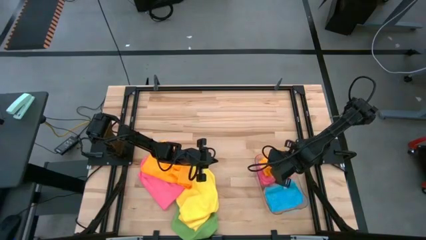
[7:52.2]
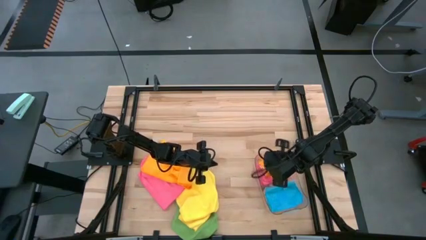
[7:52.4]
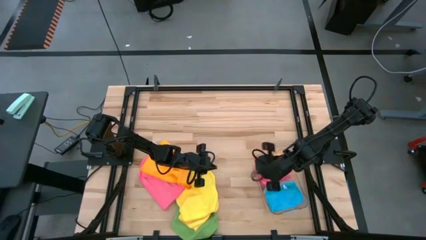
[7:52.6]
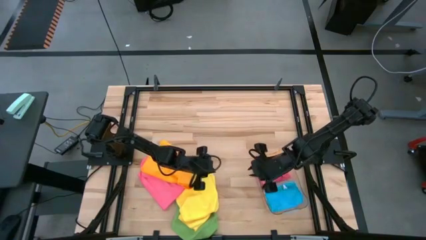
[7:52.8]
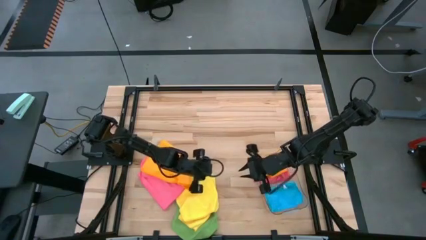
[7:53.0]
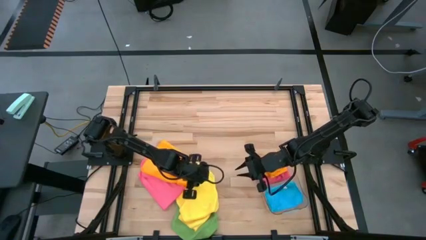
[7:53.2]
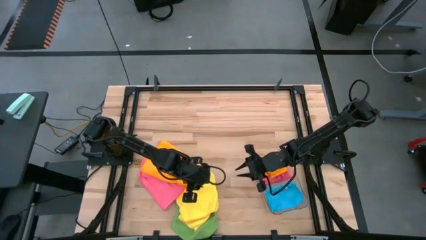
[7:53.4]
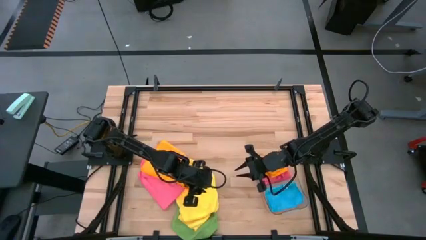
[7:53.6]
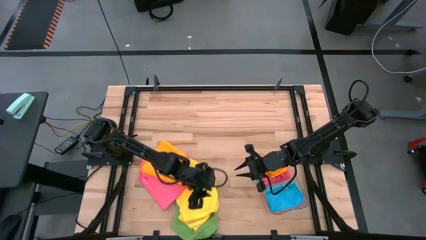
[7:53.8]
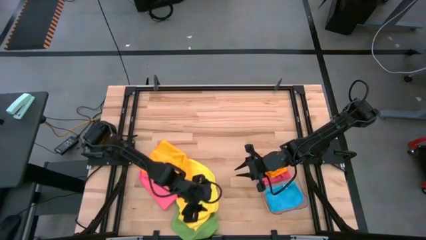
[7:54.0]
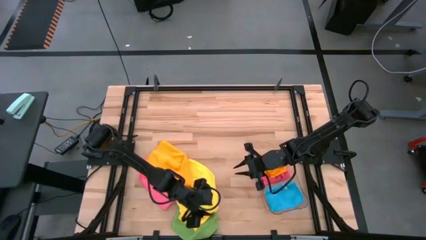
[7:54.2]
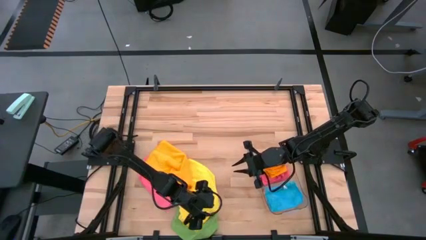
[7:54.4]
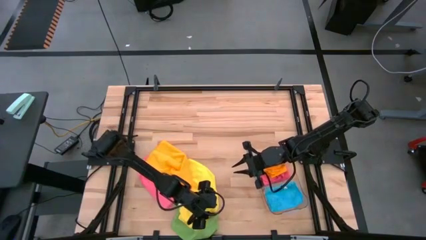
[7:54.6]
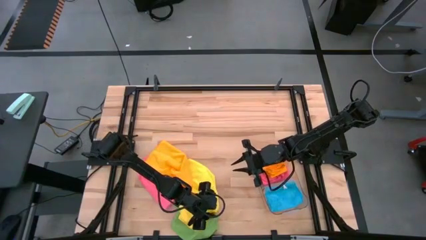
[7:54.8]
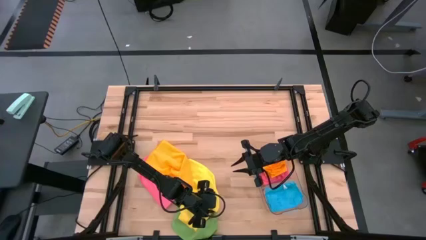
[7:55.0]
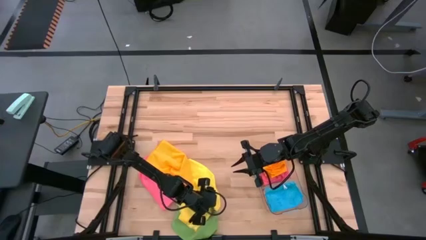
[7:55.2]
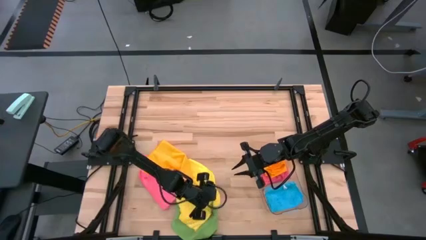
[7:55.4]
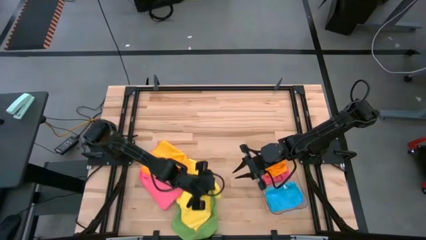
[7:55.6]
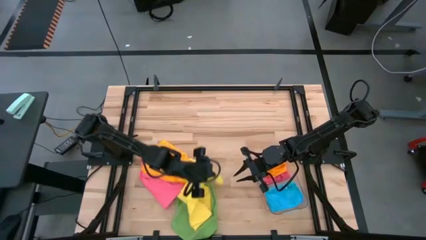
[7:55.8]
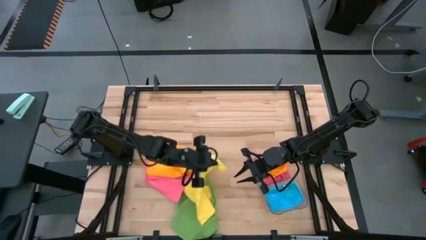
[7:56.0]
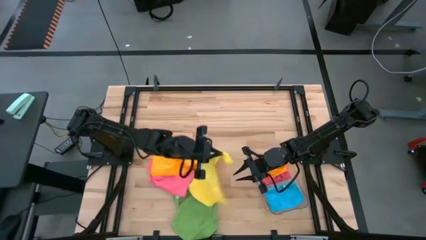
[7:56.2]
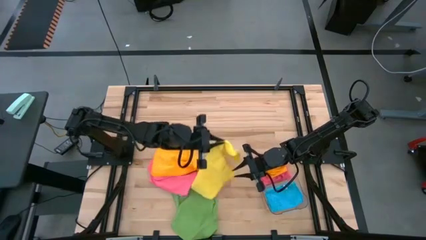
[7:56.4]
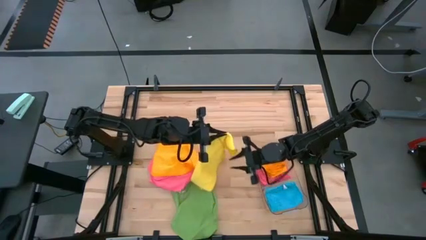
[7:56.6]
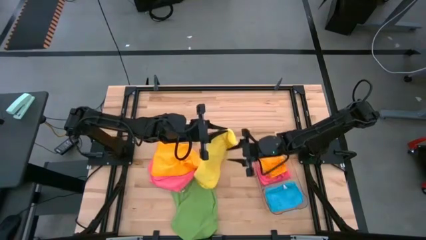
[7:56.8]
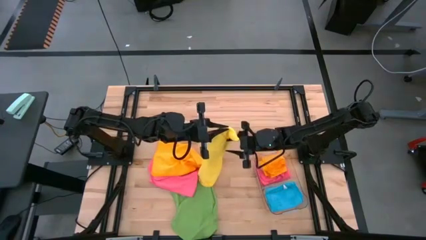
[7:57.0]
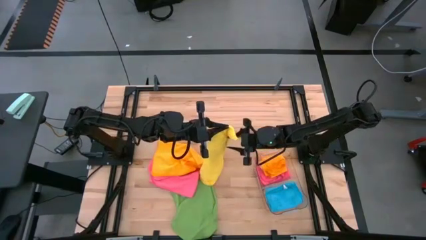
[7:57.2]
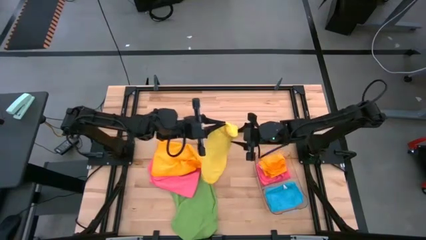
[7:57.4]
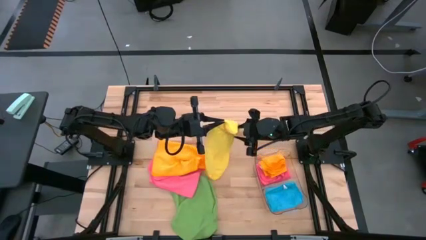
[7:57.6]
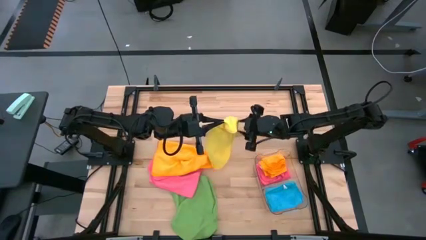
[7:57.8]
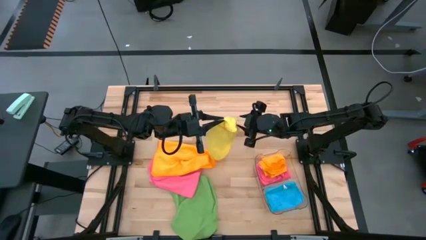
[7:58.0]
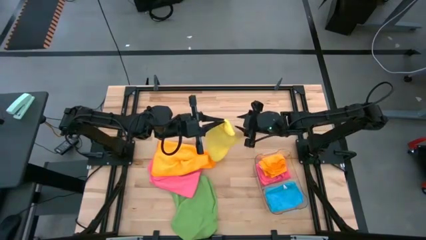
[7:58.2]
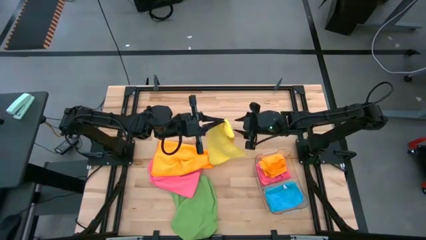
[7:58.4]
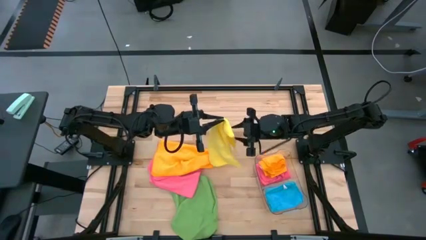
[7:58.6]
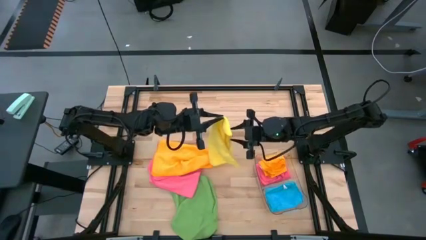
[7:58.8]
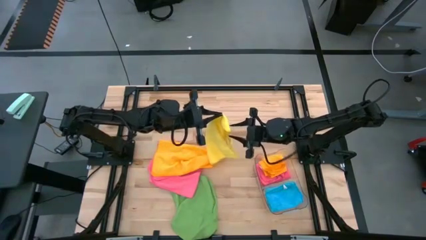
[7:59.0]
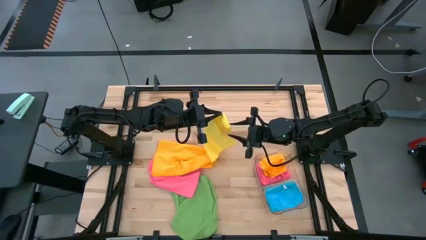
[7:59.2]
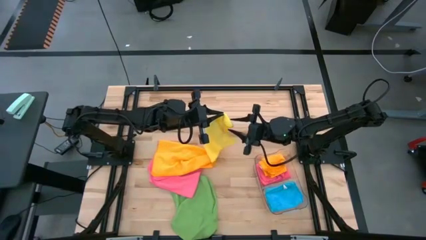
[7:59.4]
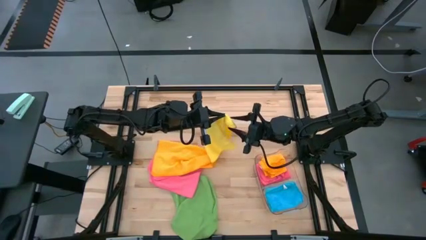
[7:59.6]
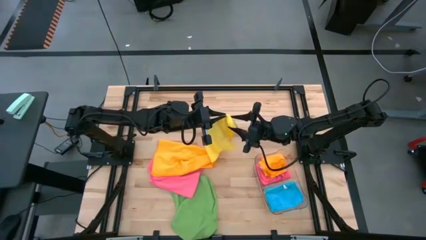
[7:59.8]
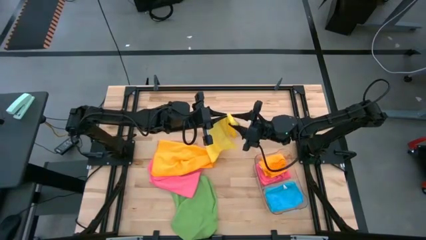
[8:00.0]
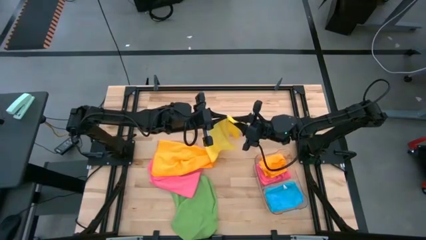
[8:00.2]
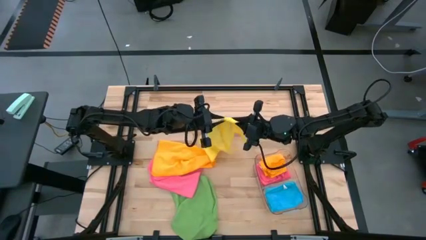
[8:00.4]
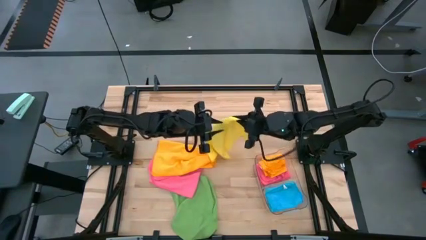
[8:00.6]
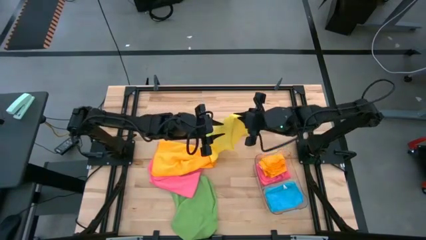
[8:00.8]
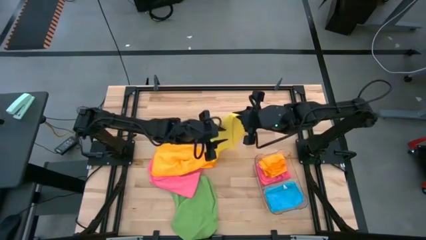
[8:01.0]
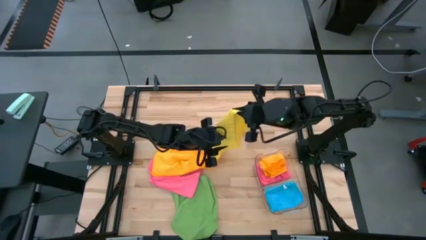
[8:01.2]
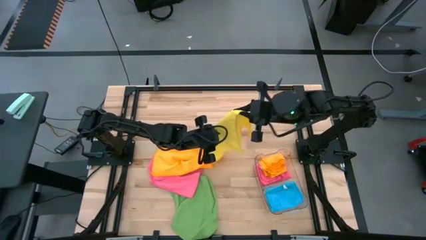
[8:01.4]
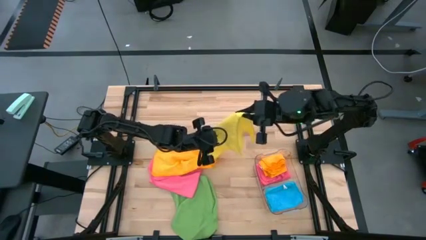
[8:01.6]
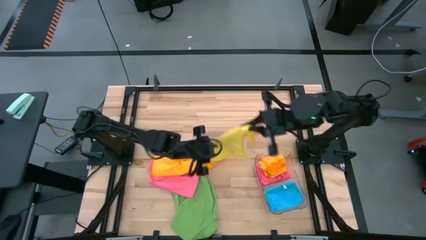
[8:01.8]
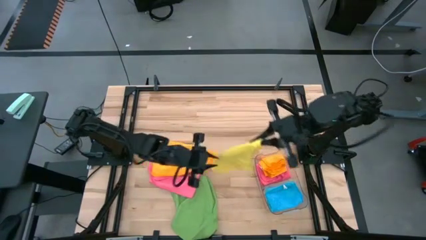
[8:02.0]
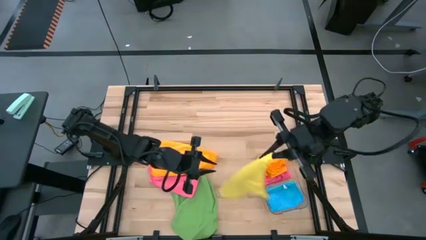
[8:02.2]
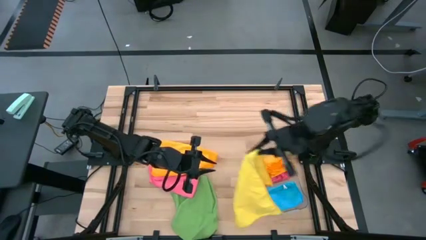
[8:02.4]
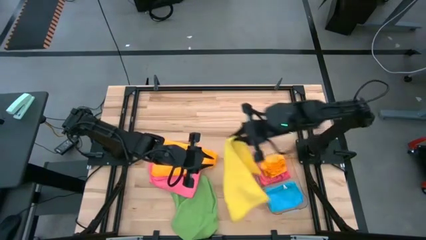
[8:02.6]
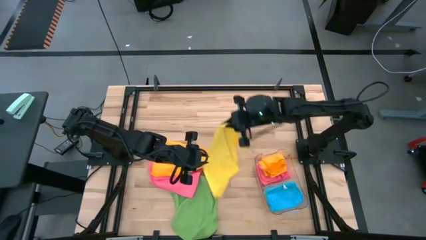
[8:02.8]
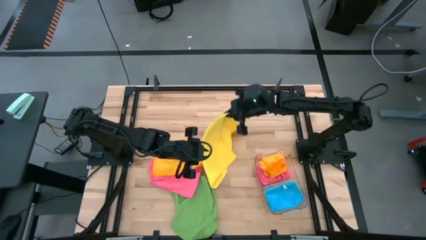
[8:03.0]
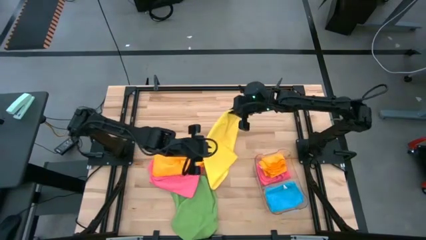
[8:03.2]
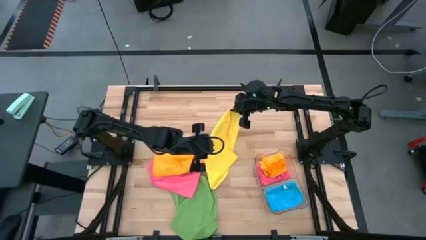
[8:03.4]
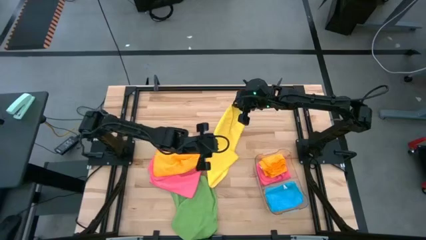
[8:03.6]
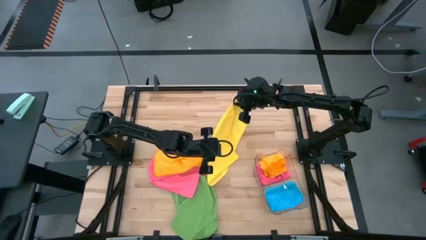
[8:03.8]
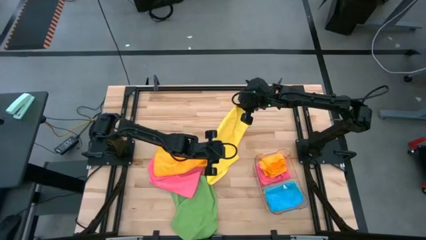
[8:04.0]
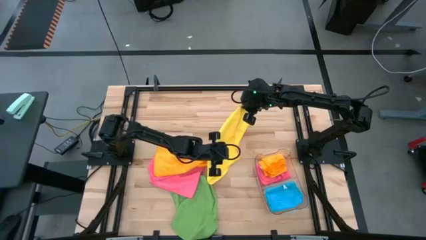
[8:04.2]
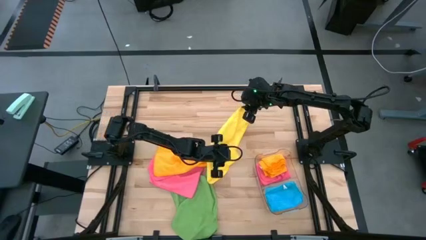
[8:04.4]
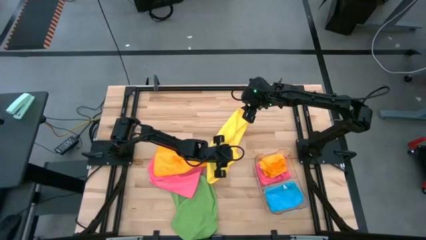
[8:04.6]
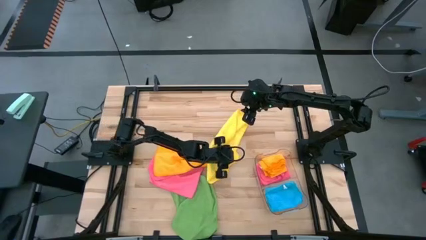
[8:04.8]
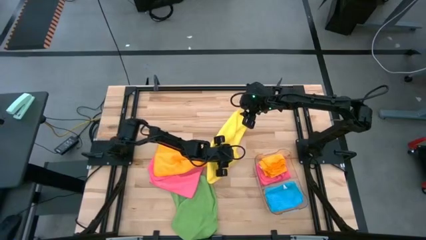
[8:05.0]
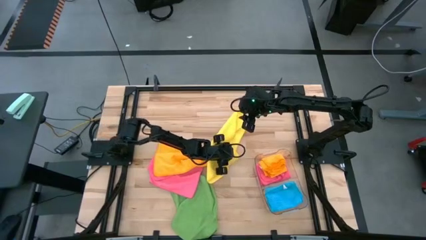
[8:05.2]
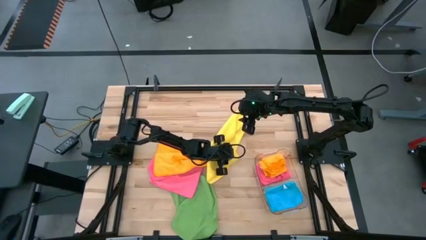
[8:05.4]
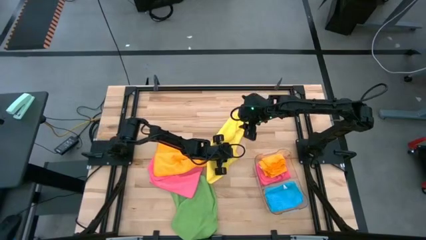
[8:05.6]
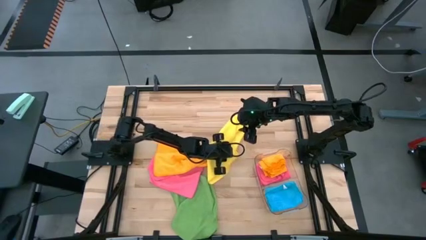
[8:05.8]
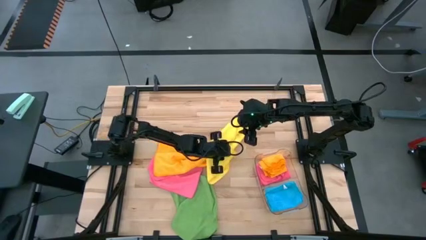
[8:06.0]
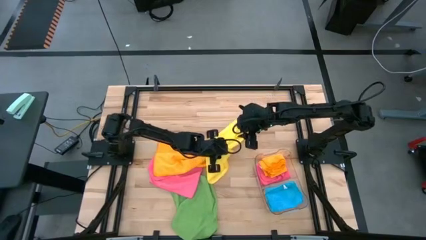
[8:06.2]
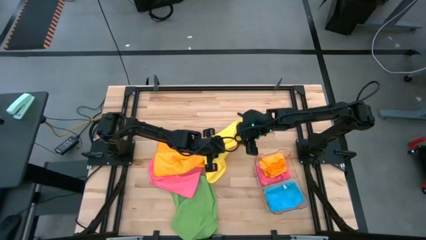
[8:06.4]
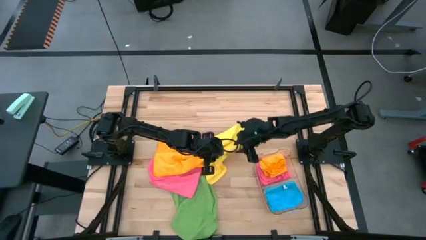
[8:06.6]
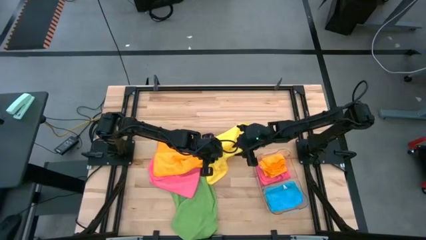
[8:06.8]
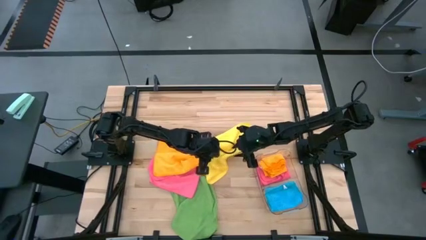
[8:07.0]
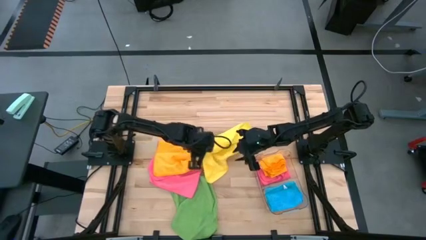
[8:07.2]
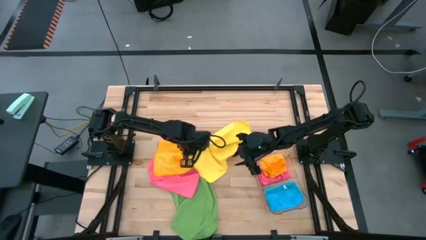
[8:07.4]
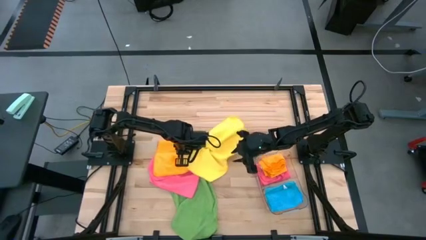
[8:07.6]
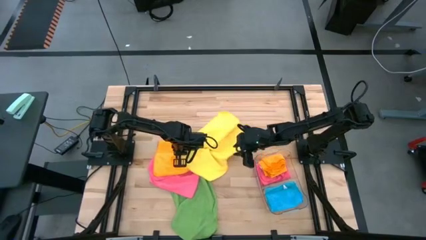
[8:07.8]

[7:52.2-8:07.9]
Task: Fold microfiber towels
Fold the yellow towel
